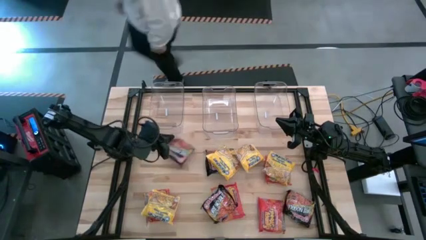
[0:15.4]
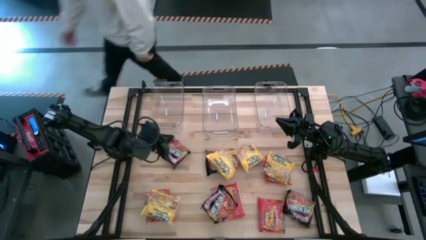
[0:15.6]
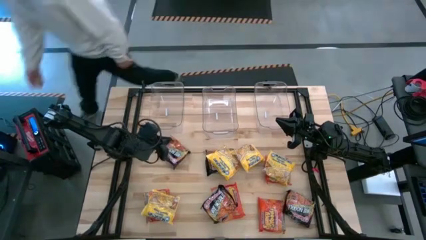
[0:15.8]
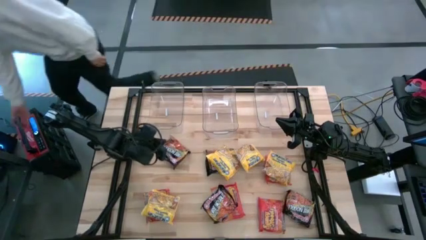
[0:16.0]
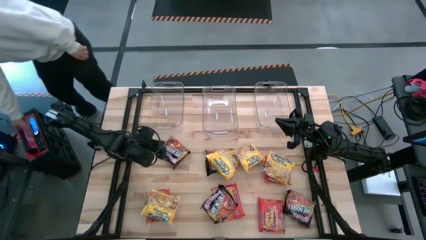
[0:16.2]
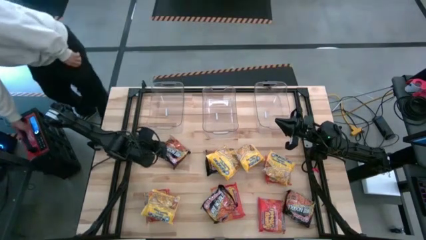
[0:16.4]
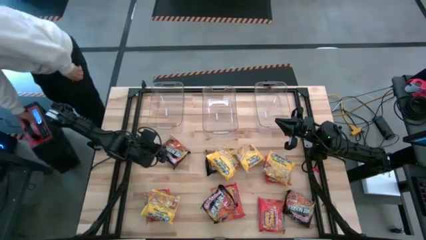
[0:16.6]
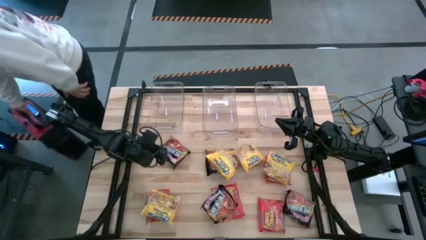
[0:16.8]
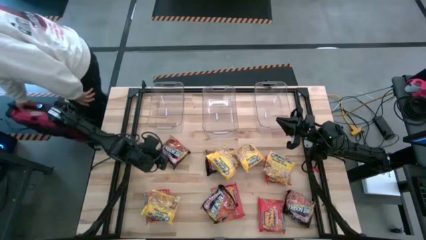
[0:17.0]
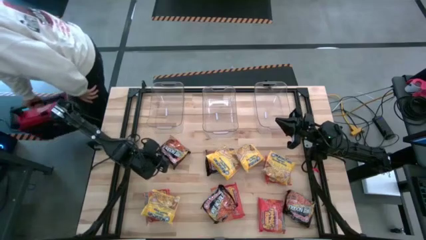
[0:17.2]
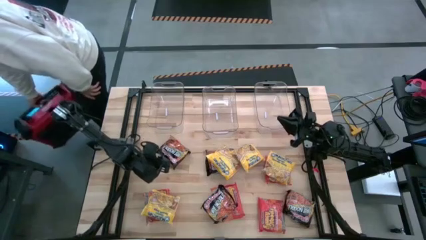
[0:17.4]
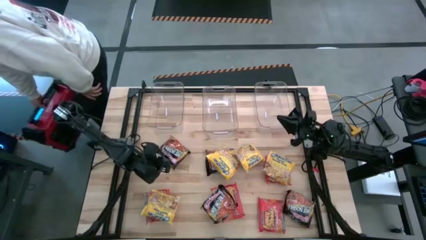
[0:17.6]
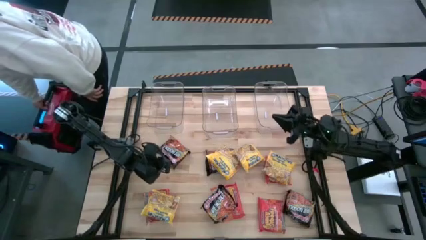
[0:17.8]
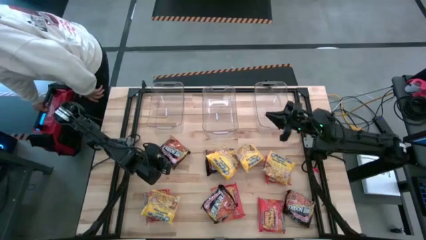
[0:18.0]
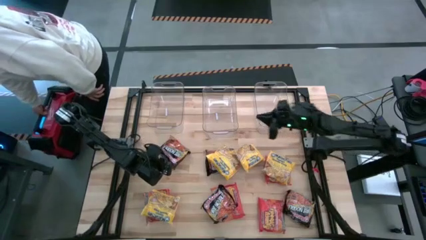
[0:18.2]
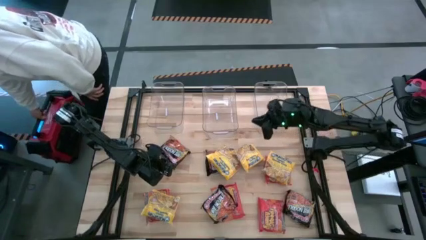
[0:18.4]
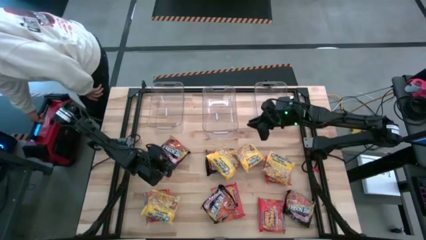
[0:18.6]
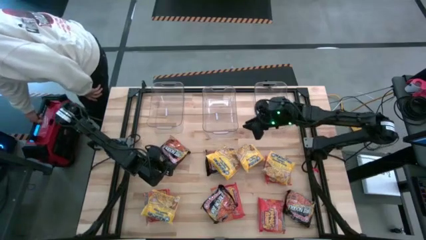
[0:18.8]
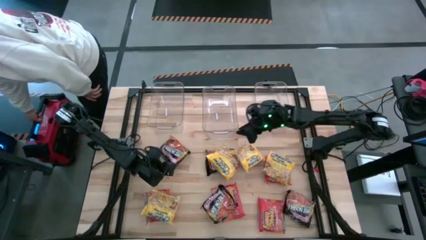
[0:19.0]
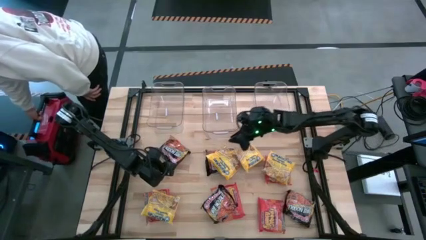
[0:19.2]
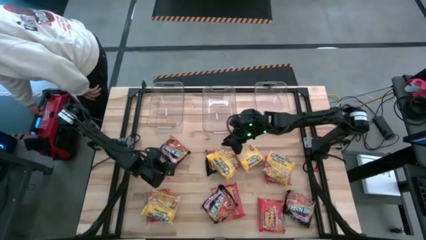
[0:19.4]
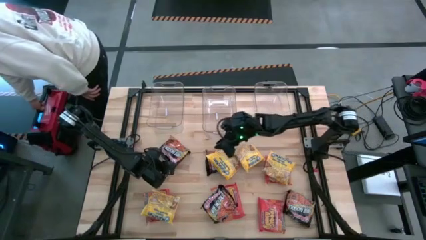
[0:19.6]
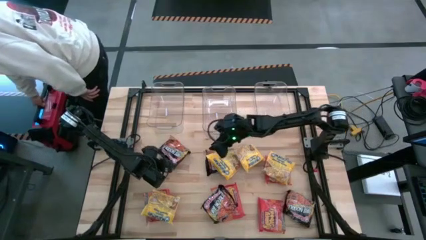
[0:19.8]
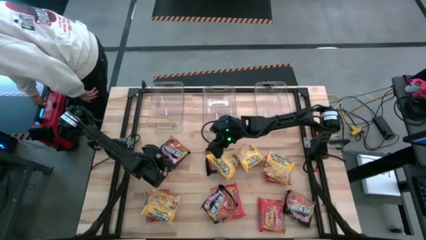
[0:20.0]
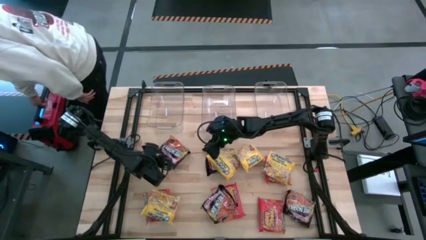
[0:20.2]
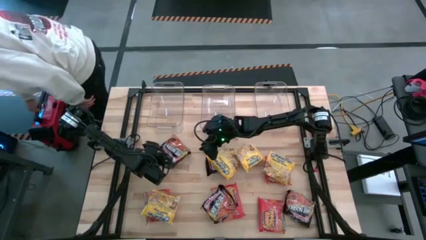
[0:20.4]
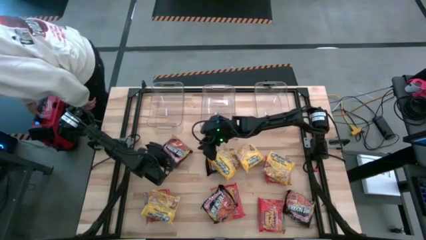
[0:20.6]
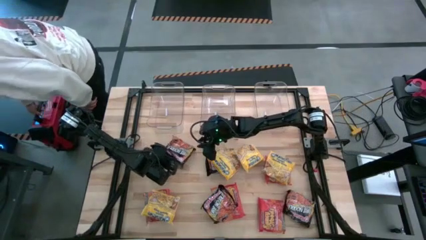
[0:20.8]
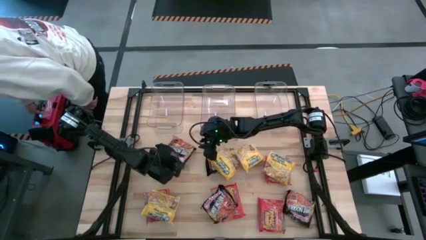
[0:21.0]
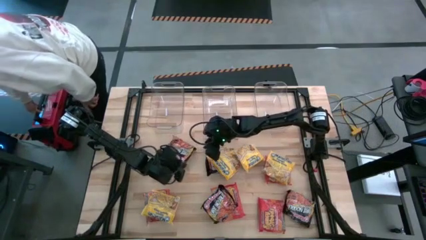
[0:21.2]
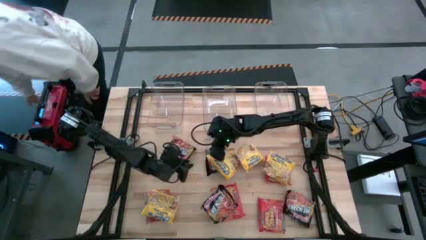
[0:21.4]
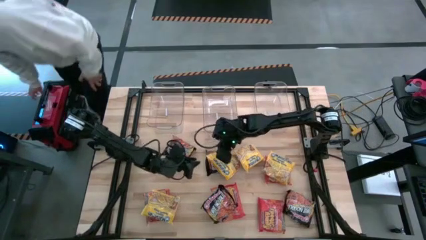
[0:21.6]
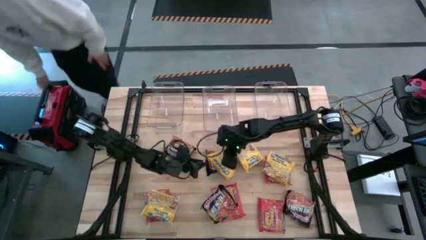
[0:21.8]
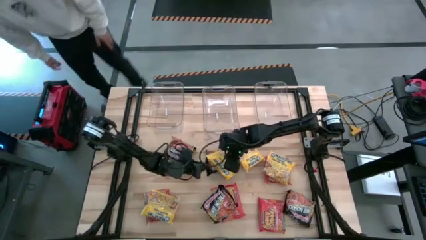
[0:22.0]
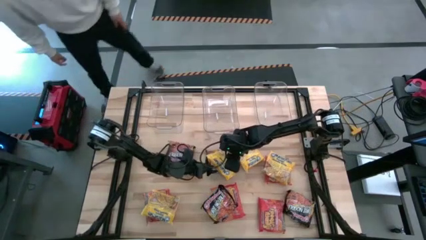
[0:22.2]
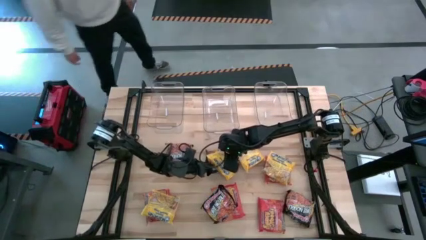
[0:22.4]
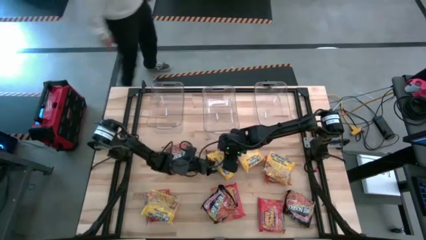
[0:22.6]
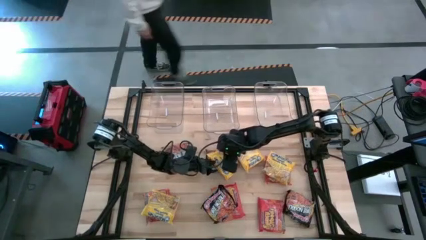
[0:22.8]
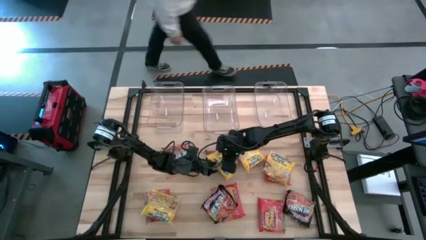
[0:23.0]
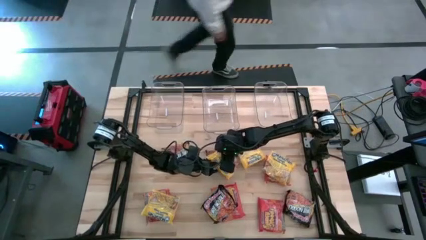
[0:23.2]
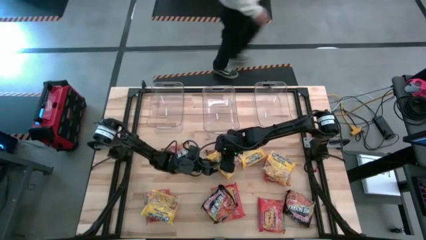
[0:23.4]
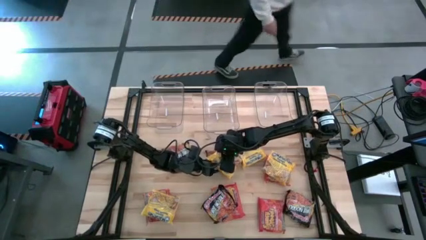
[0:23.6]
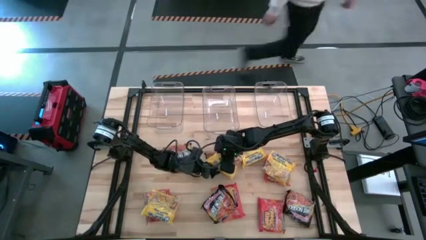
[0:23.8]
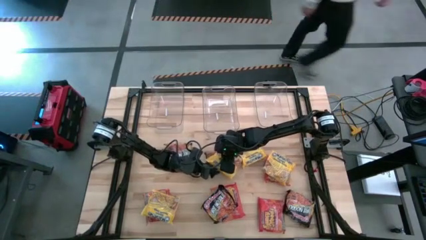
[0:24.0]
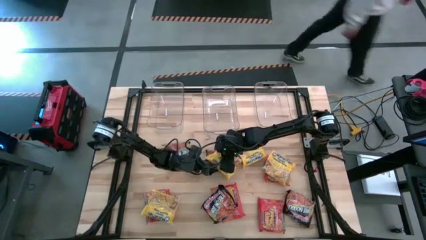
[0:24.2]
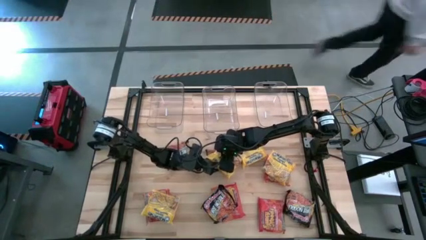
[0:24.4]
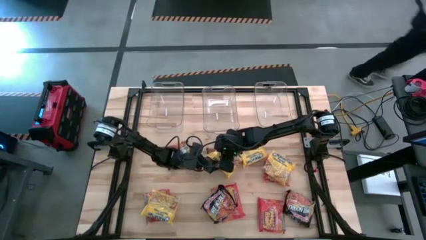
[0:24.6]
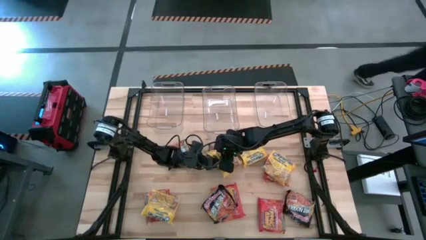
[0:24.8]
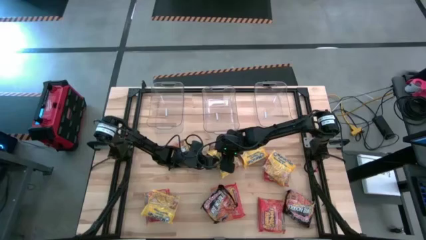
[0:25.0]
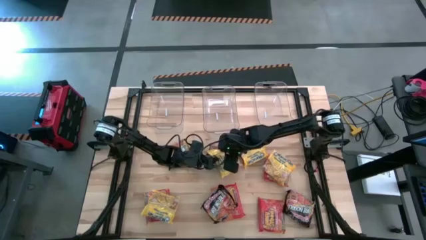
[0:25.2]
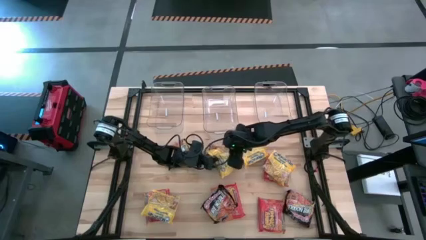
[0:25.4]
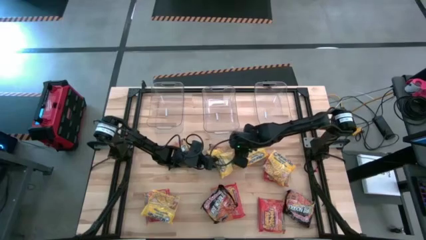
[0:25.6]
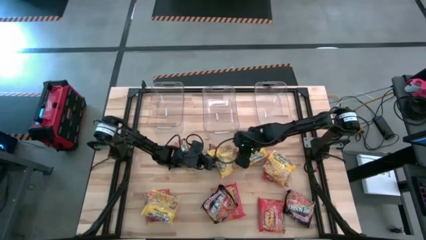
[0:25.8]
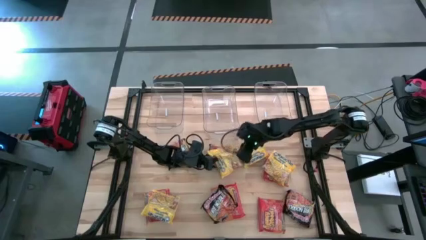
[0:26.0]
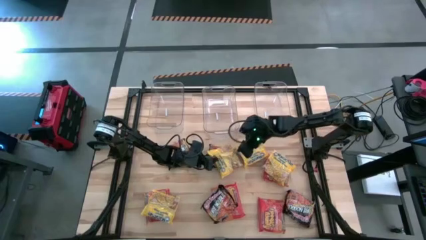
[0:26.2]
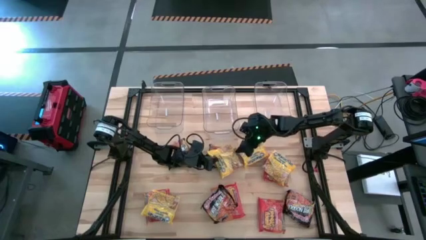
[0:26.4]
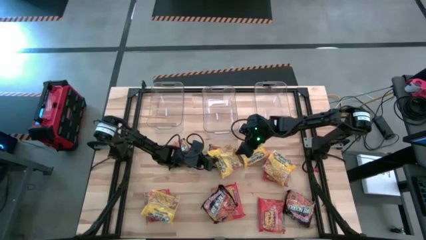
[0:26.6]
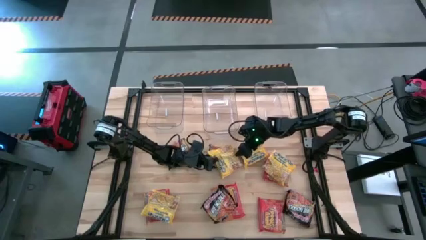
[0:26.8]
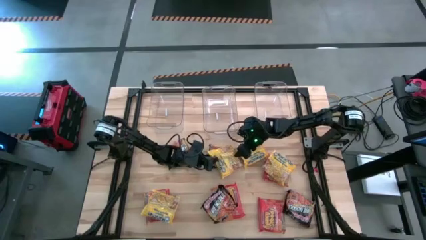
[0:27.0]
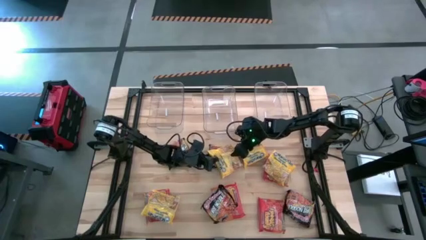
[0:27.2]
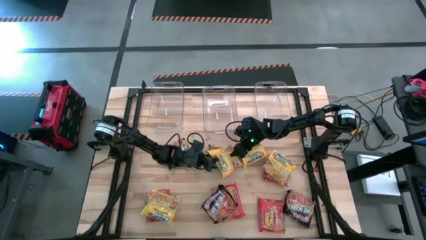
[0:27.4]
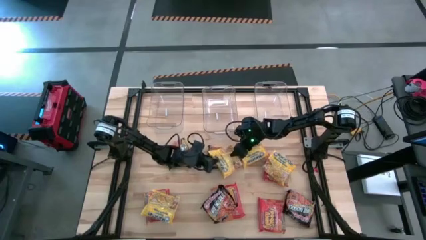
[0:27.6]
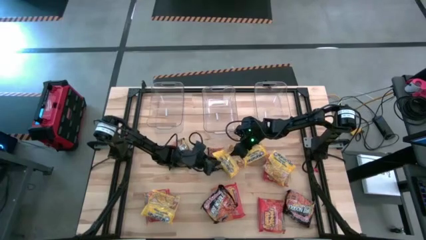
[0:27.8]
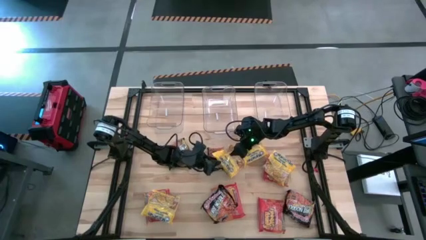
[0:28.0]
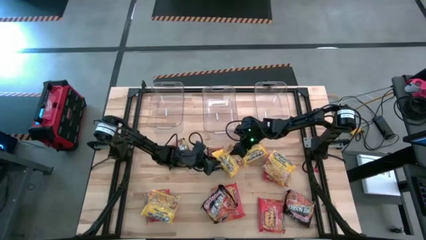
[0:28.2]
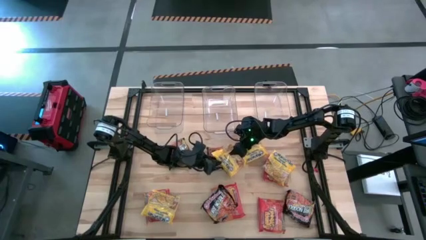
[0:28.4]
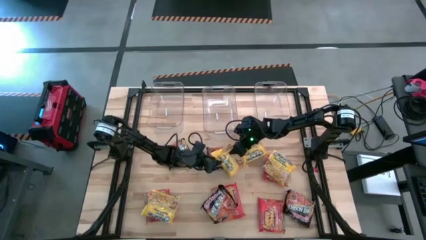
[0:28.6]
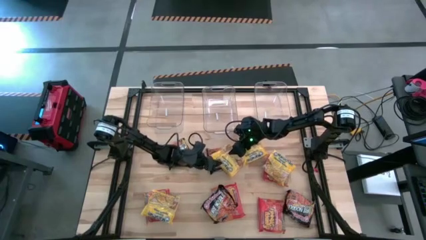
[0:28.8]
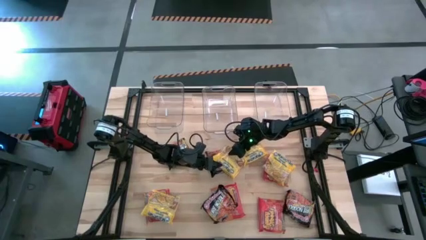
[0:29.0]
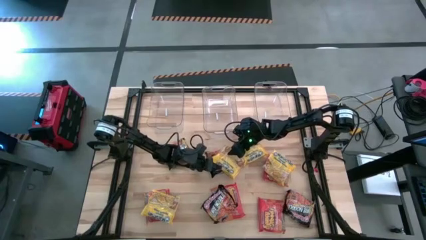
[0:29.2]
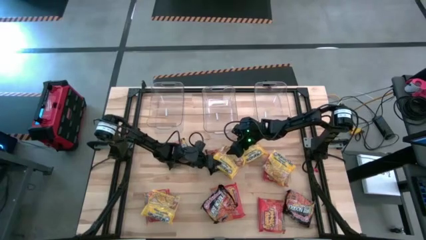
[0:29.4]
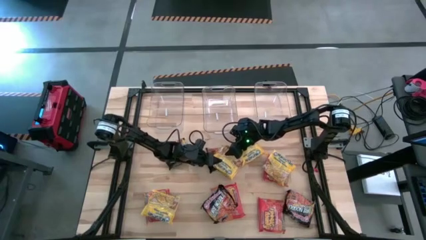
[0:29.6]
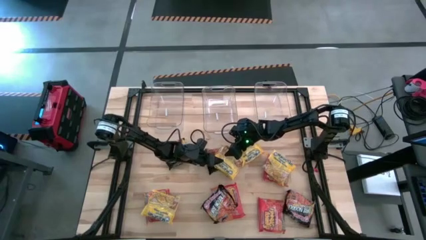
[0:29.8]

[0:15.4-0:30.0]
Task: Sort Maruchan noodles
Put the yellow noodle pack into the left transparent bin
